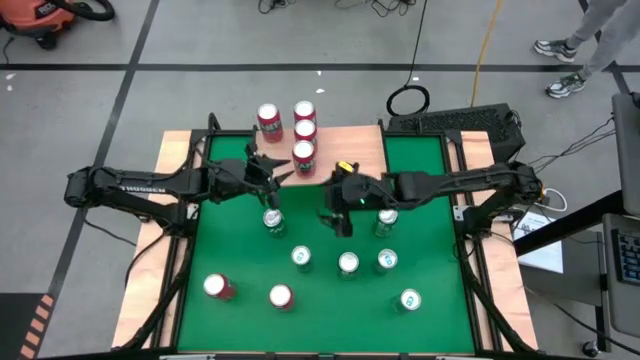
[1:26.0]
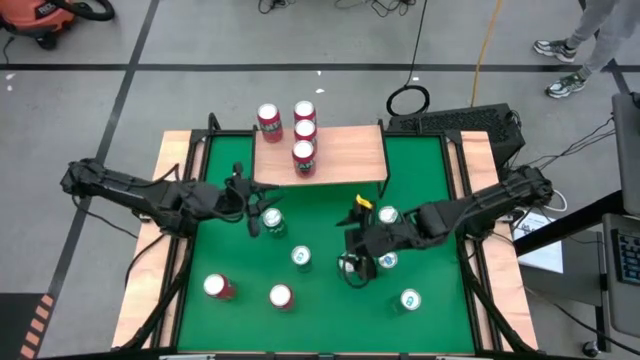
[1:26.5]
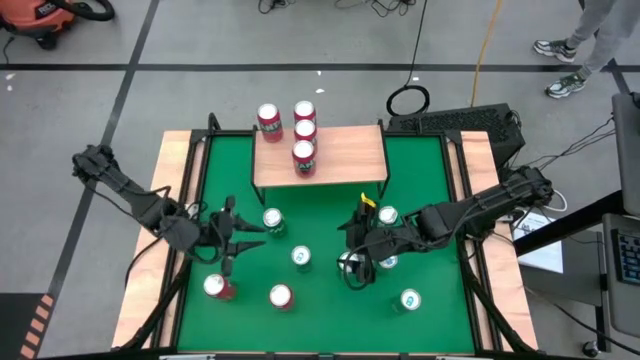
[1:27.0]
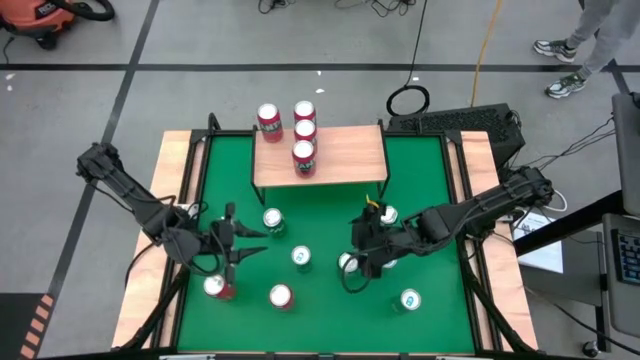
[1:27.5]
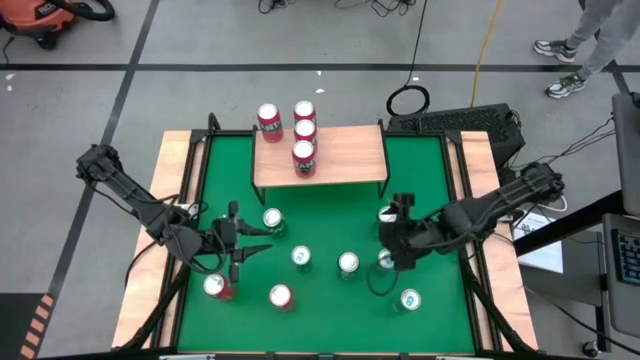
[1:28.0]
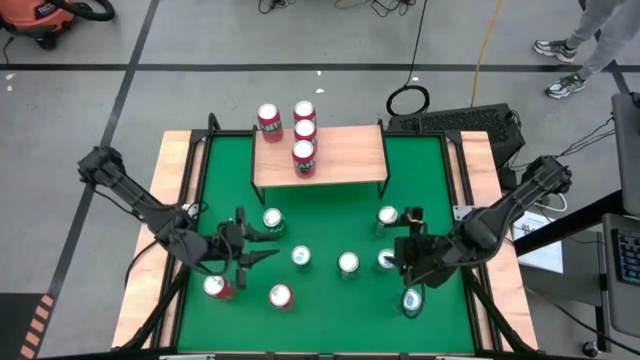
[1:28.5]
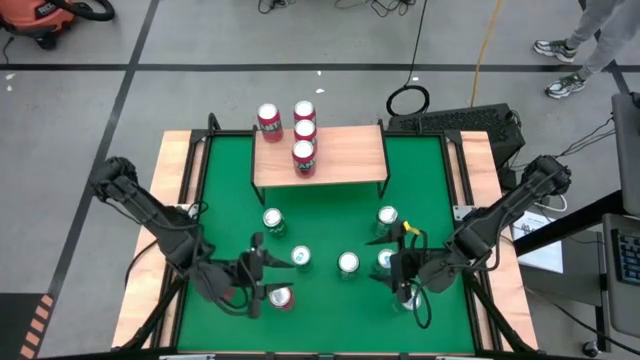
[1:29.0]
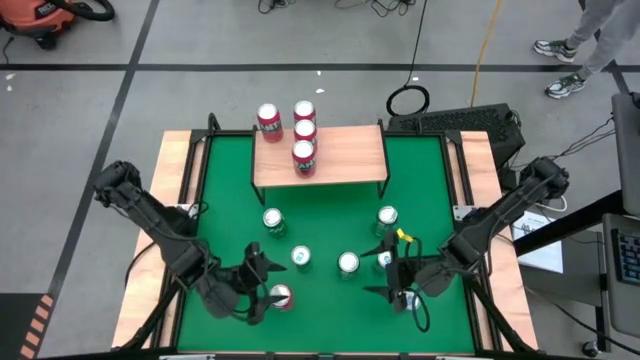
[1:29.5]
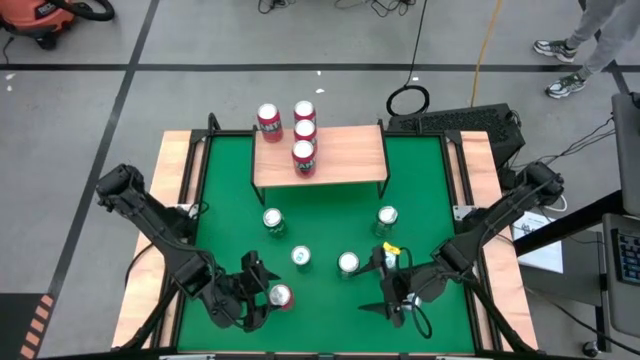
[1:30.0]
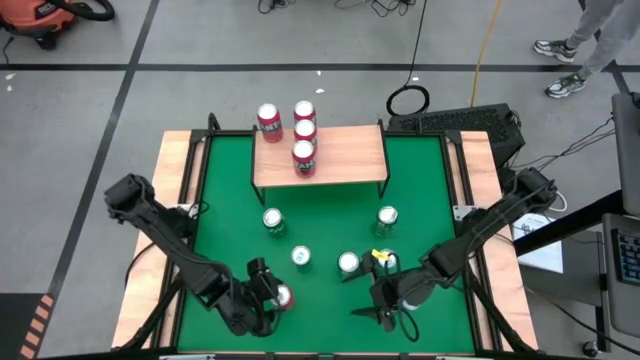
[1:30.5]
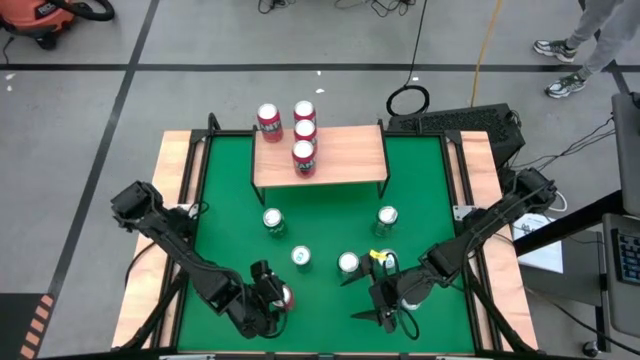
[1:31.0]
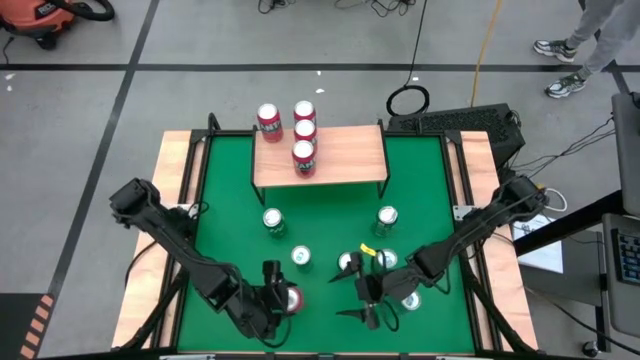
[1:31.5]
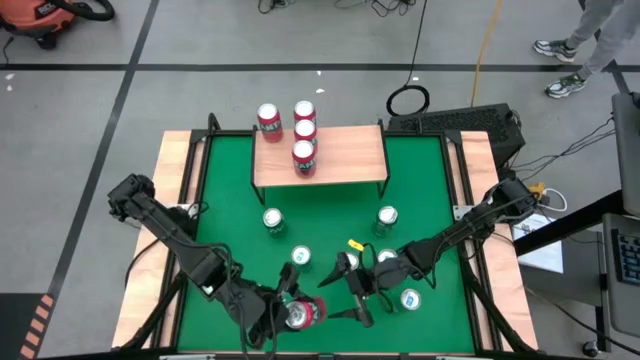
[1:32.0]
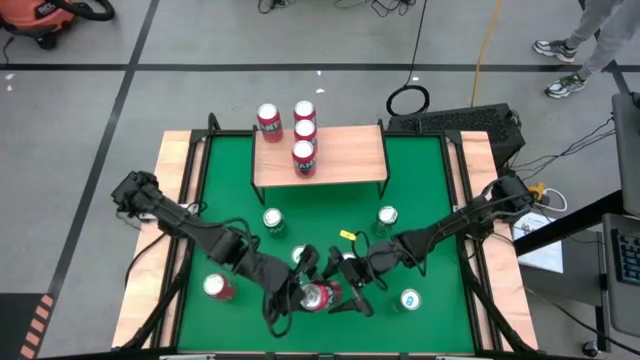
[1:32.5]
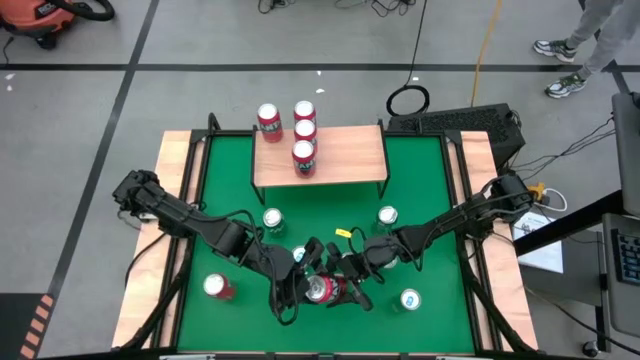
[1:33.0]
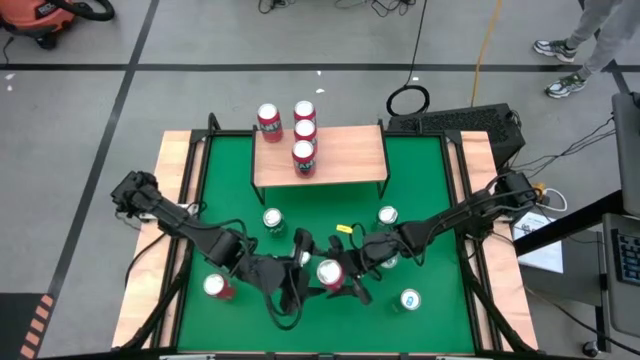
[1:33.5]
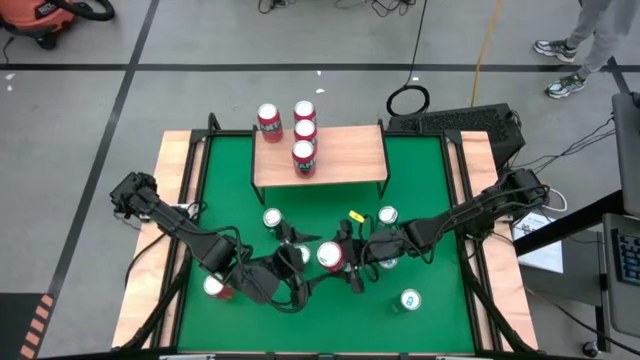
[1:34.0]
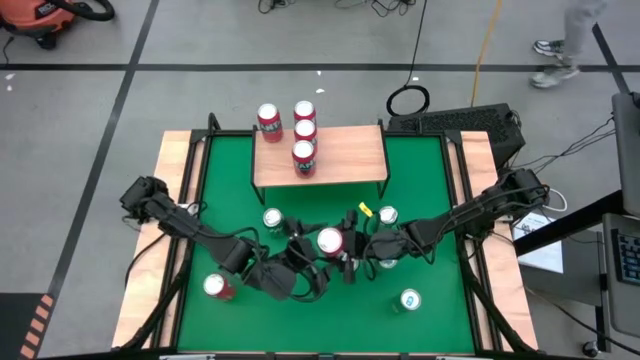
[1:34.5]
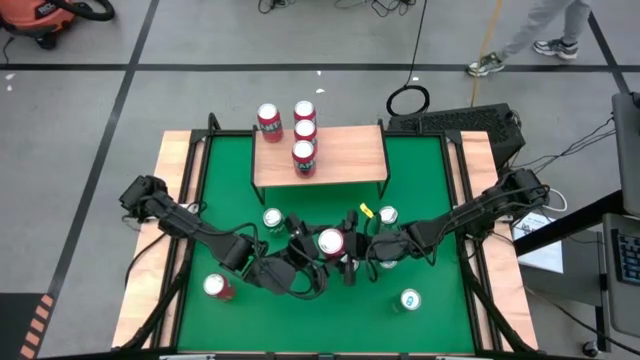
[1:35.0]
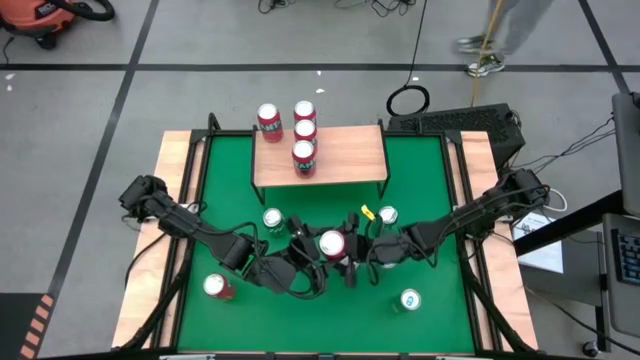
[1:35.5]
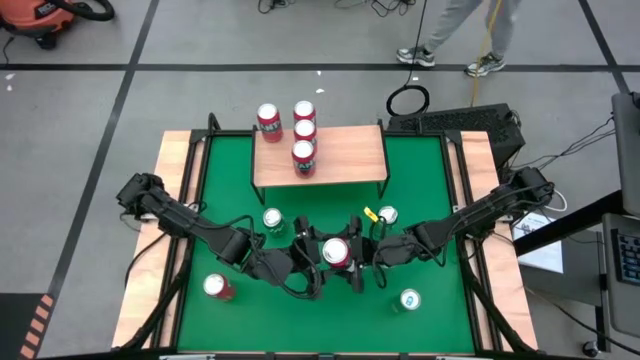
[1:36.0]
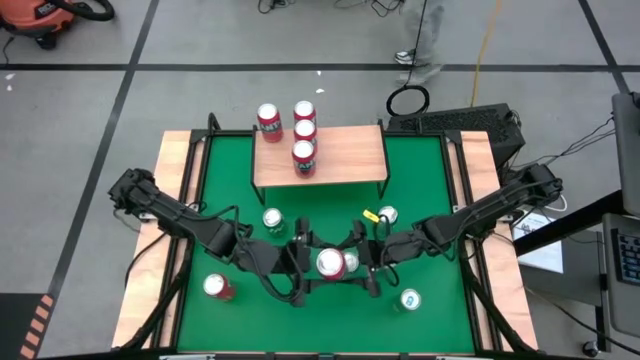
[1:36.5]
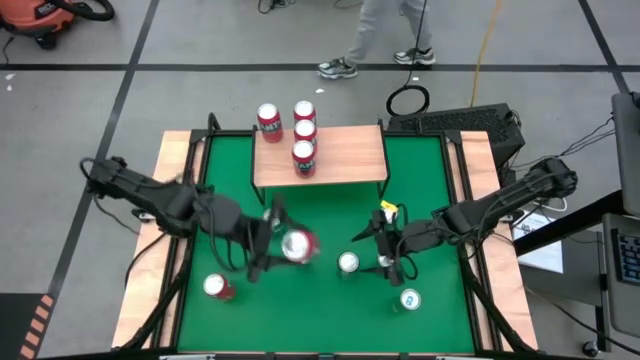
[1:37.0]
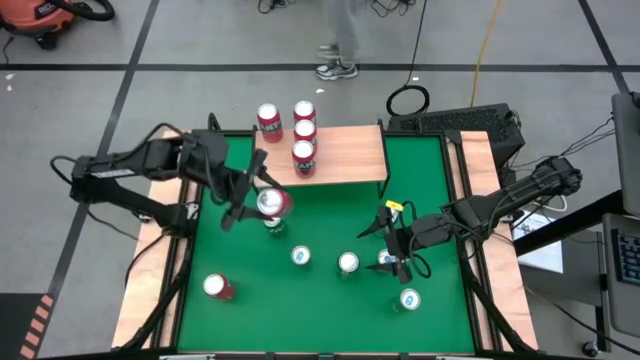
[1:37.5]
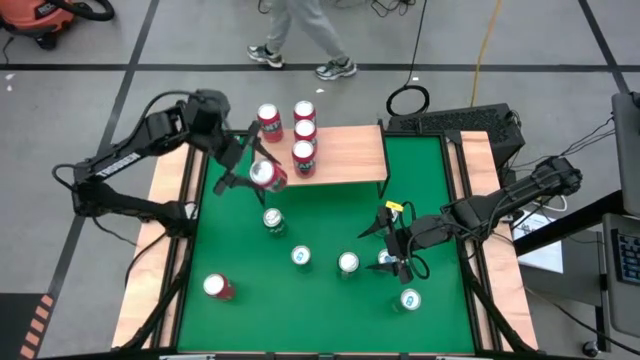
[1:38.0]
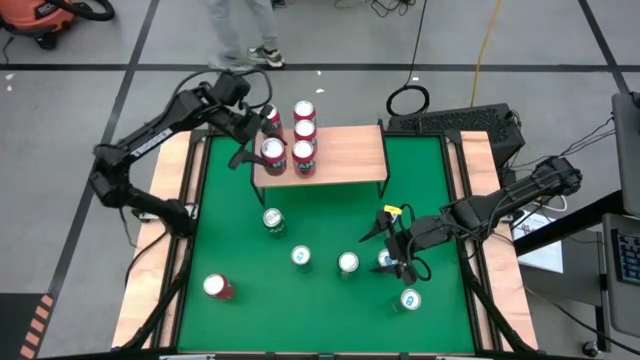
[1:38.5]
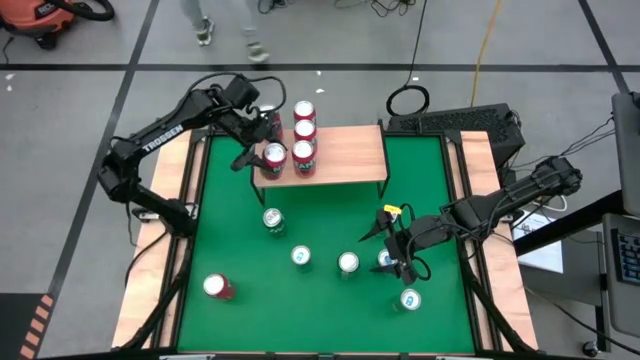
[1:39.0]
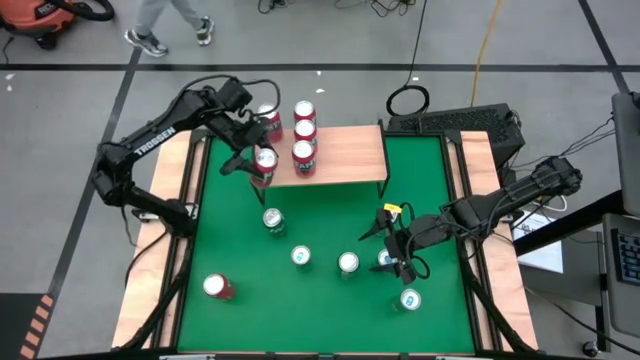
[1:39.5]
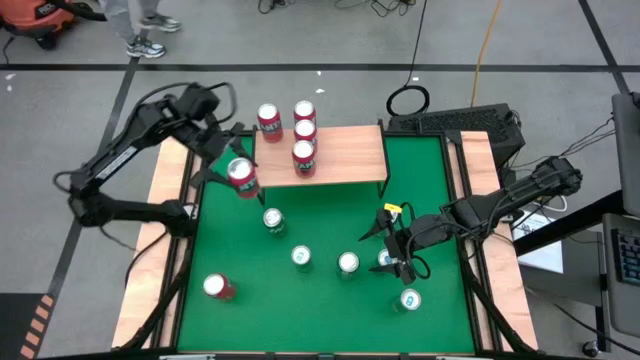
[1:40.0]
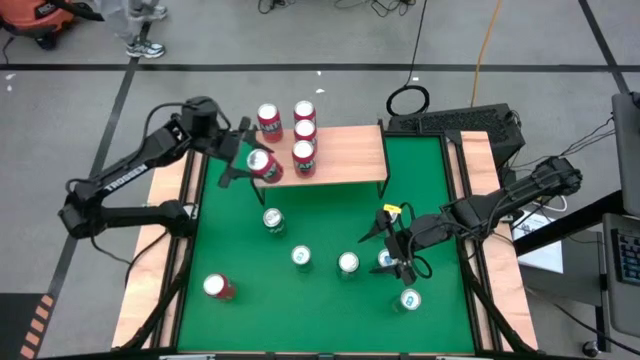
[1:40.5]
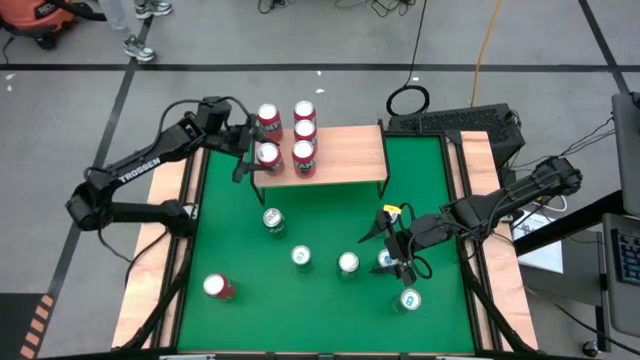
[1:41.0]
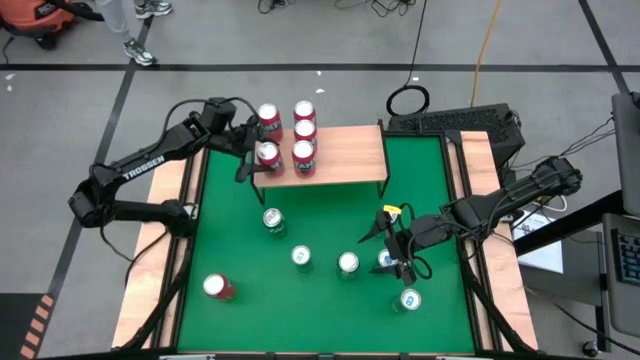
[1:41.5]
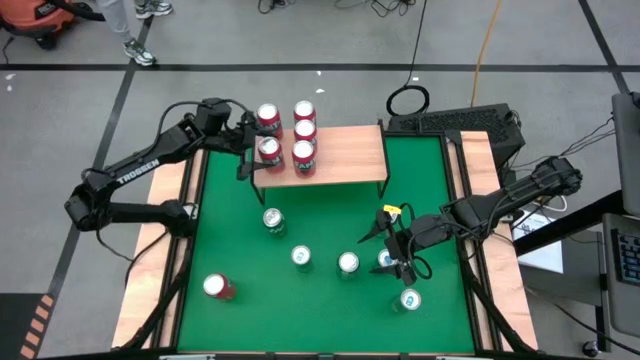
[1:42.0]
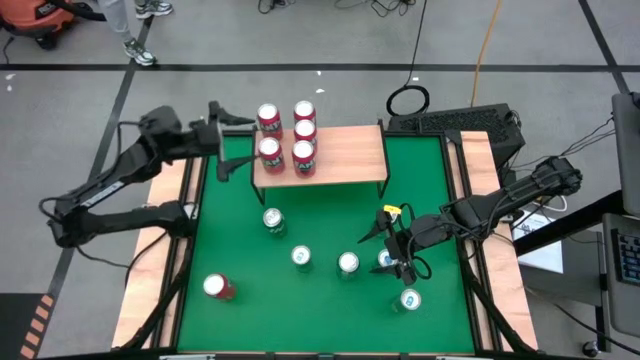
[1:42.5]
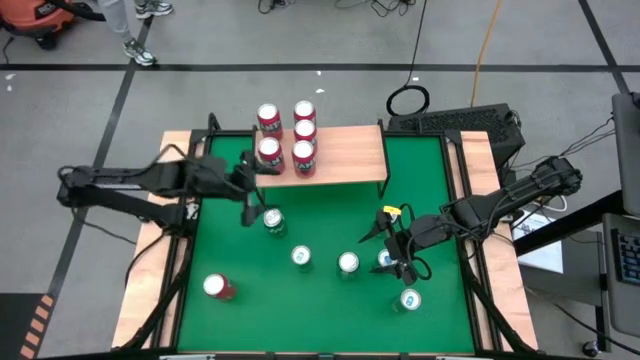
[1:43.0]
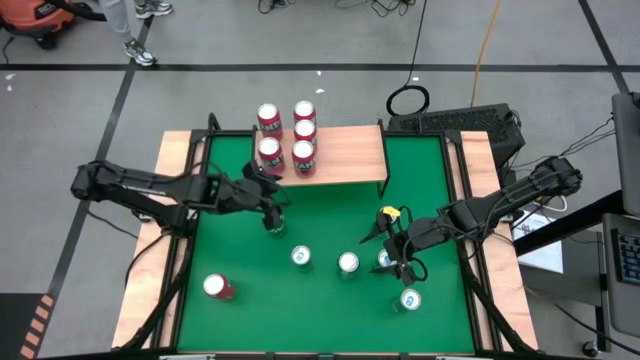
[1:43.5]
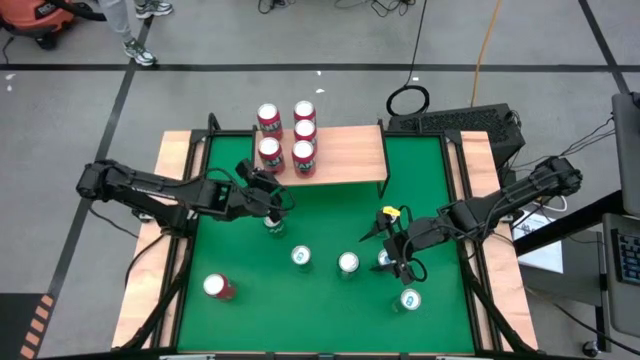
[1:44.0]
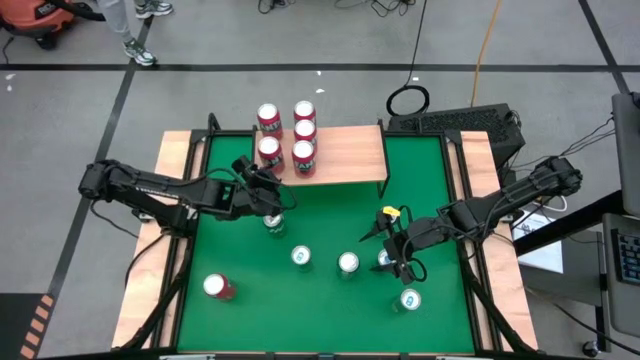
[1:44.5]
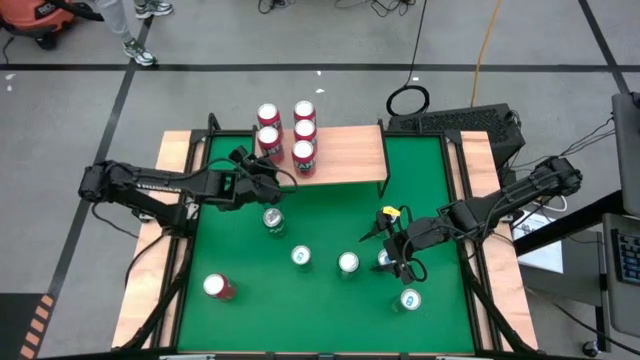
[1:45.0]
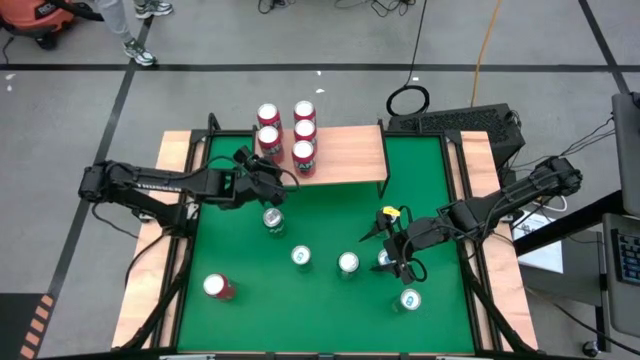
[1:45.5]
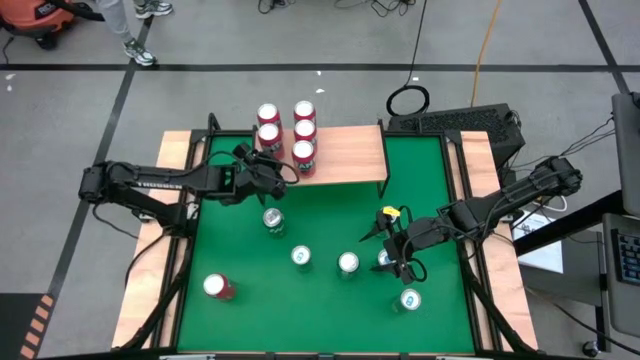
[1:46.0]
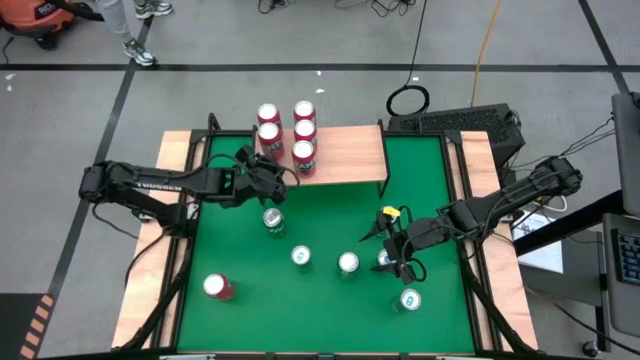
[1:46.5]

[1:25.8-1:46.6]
Task: Place canned beverage on shelf
Put the red soda can on the shelf aligned with the other red soda can

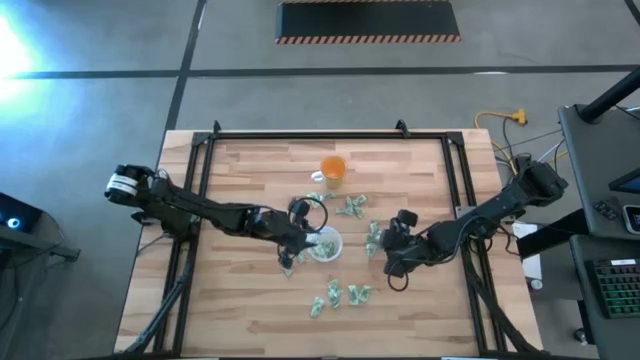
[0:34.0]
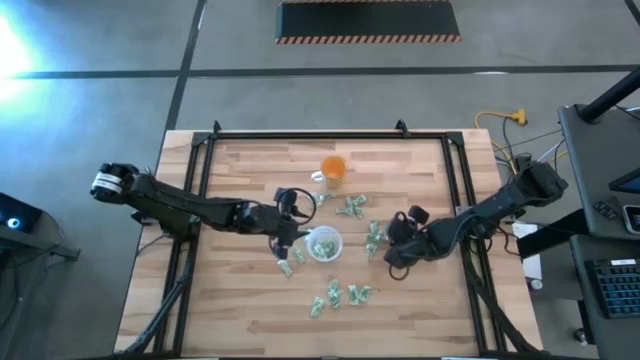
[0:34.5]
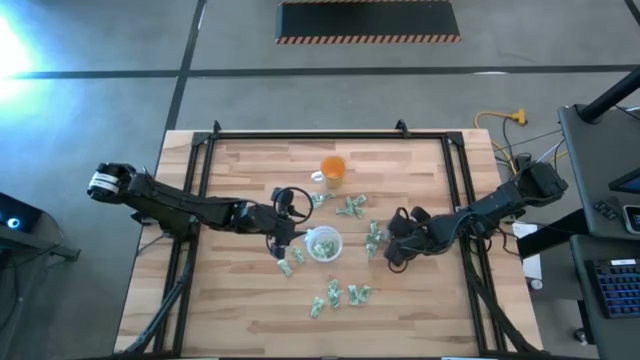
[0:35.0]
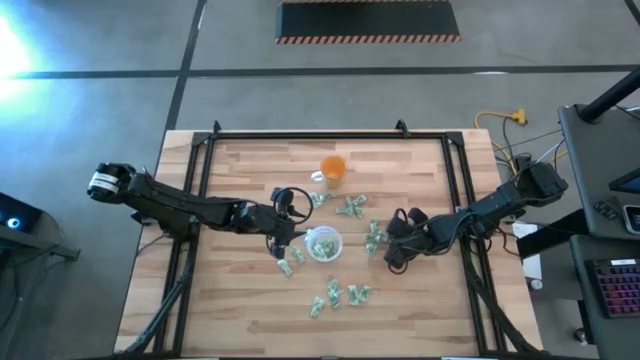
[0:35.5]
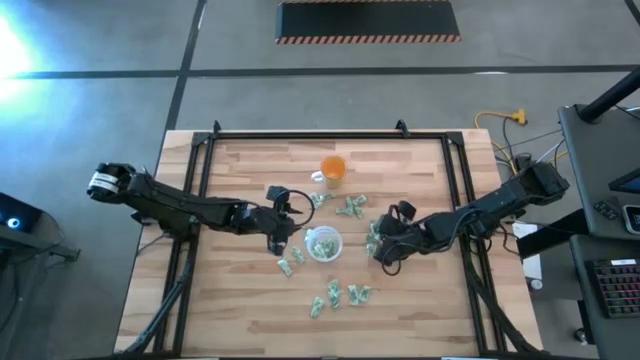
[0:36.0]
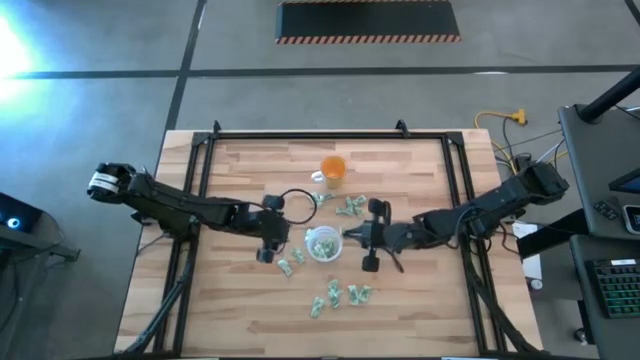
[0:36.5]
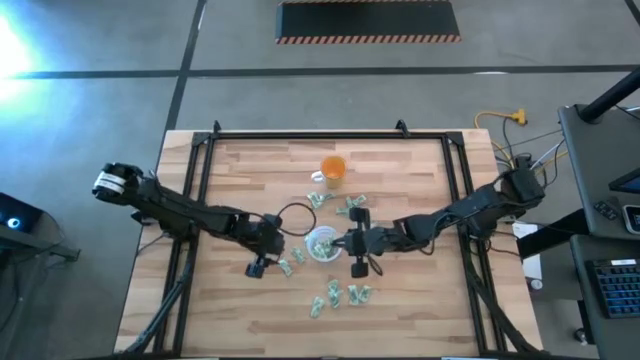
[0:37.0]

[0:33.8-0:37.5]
Task: Pick and place Stevia / Truvia into bins
Put the green stevia packet into the transparent container
